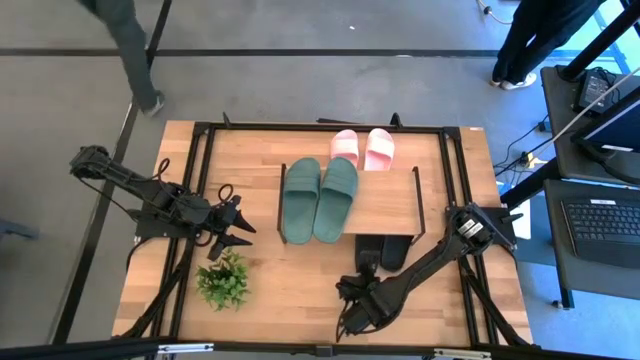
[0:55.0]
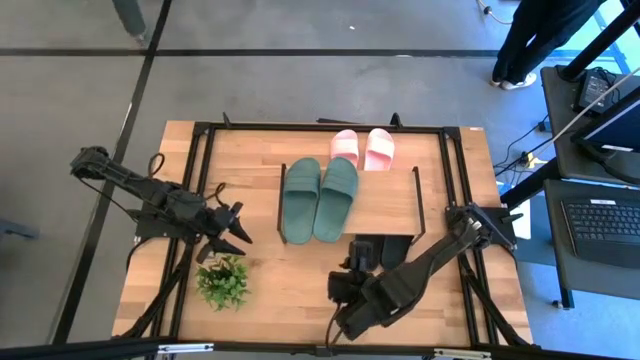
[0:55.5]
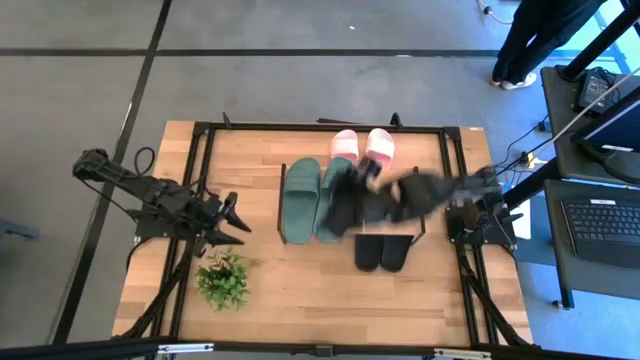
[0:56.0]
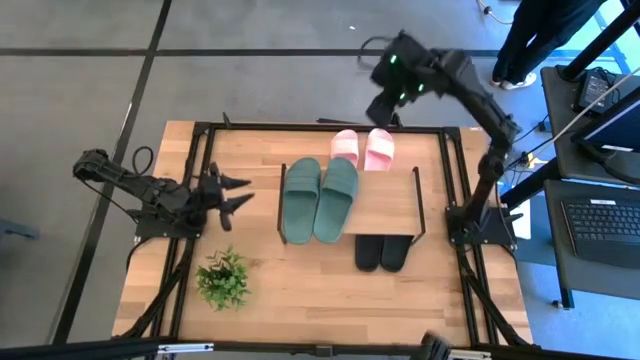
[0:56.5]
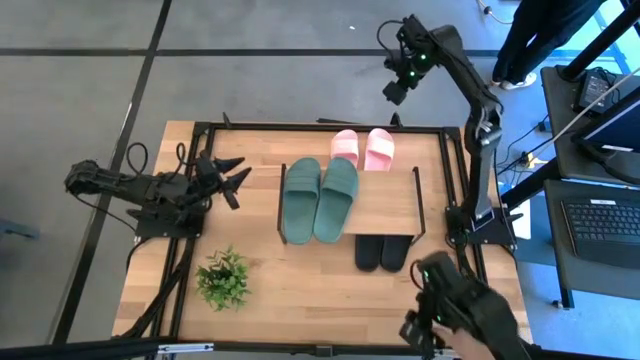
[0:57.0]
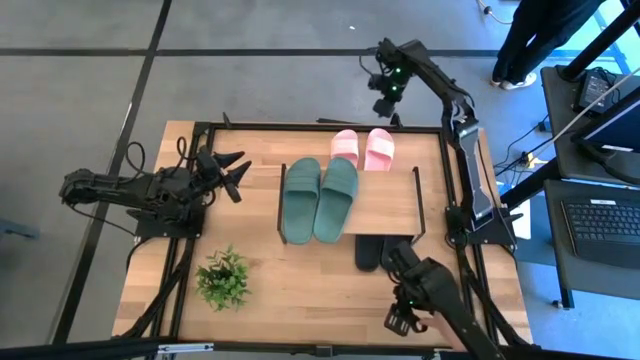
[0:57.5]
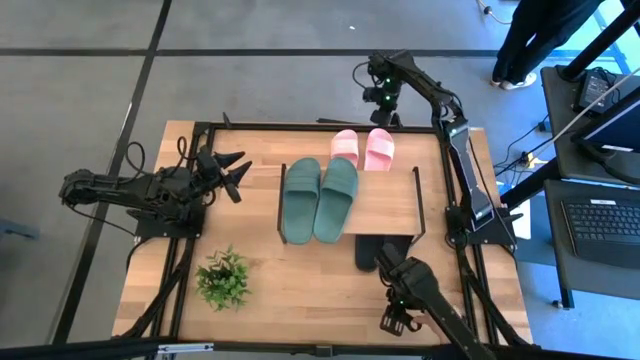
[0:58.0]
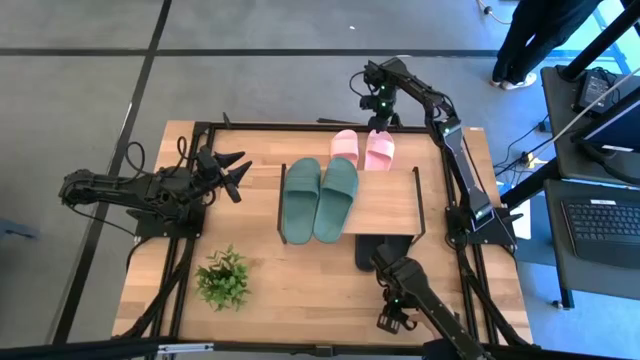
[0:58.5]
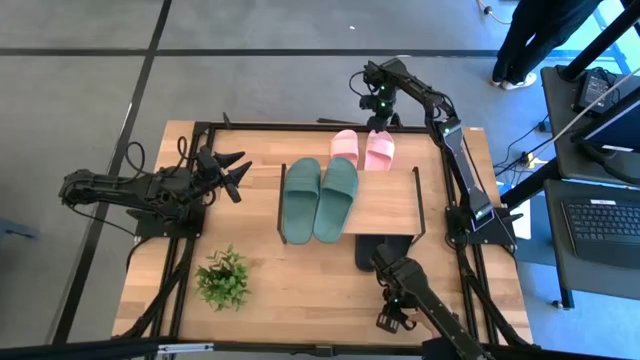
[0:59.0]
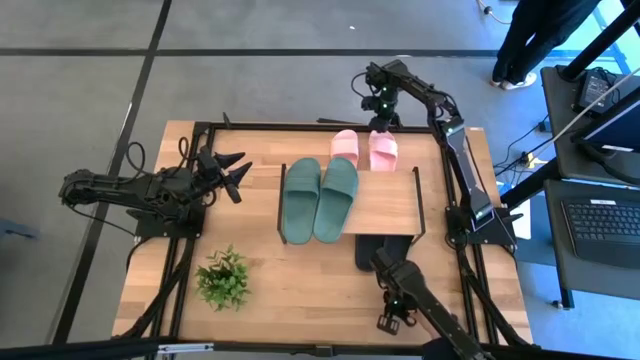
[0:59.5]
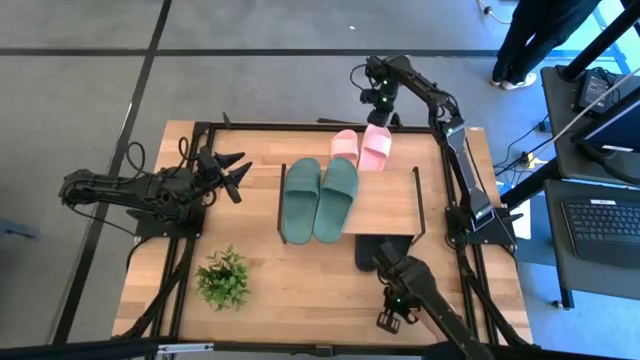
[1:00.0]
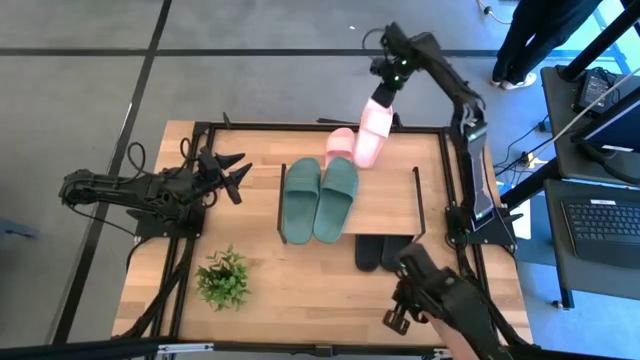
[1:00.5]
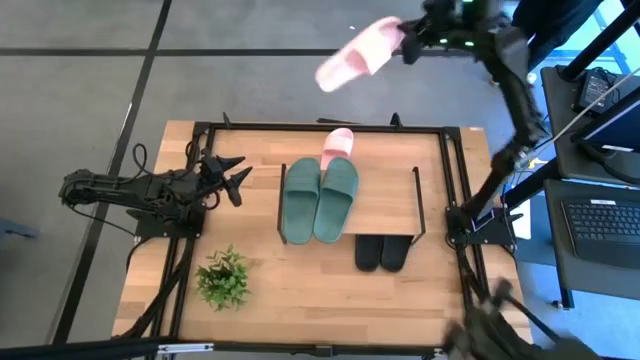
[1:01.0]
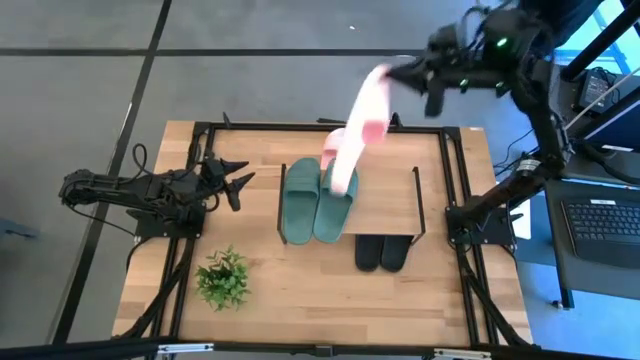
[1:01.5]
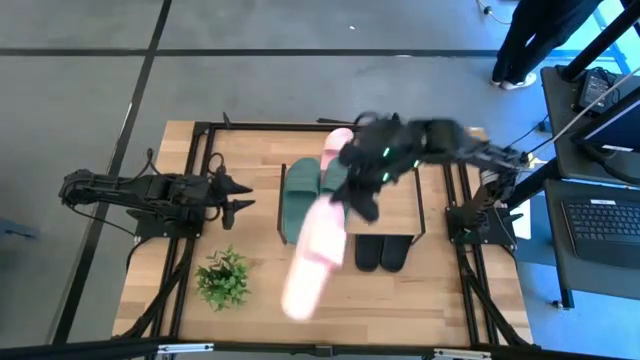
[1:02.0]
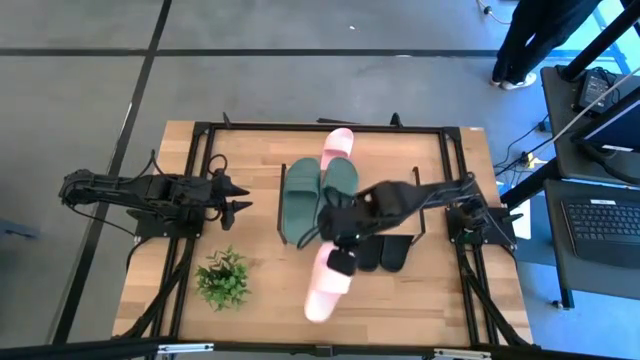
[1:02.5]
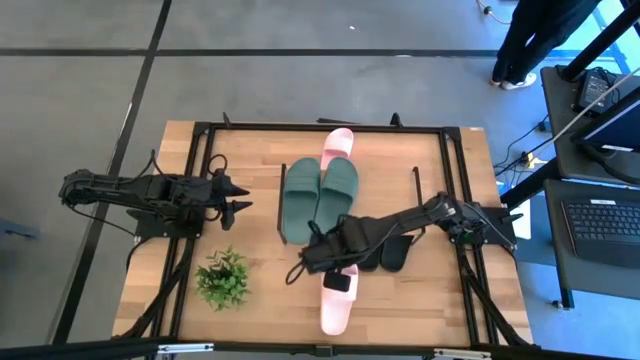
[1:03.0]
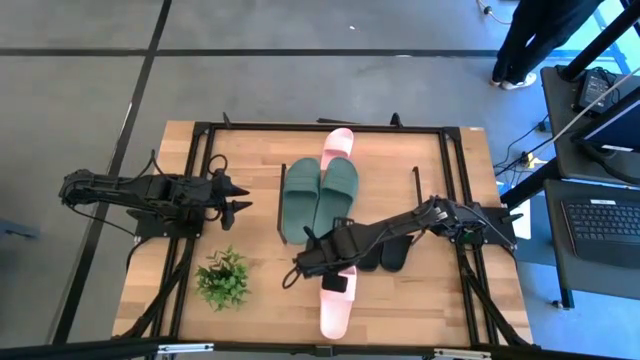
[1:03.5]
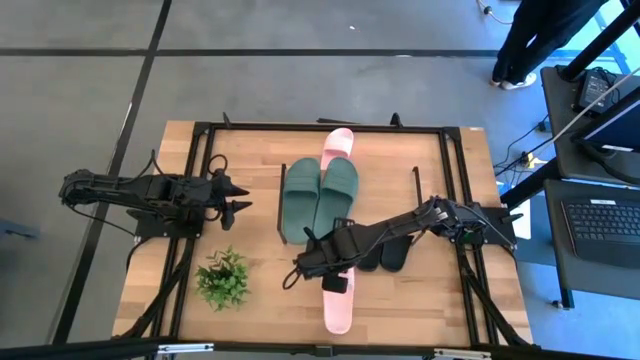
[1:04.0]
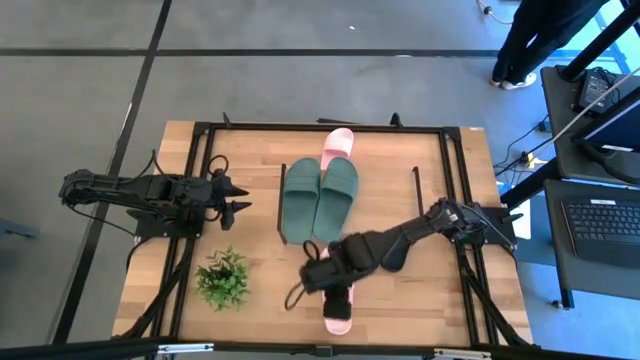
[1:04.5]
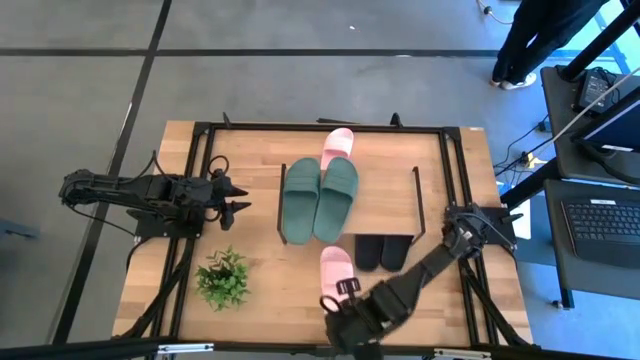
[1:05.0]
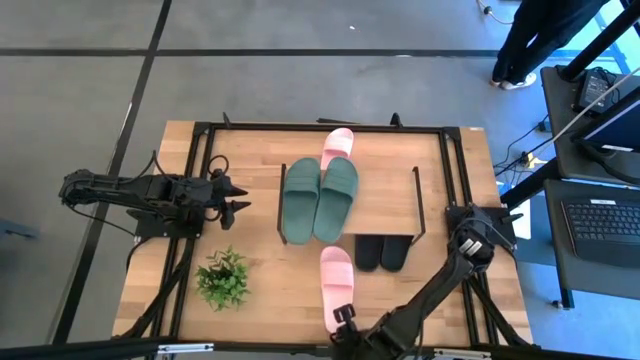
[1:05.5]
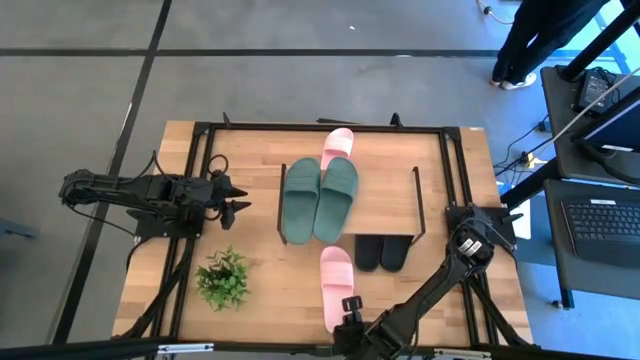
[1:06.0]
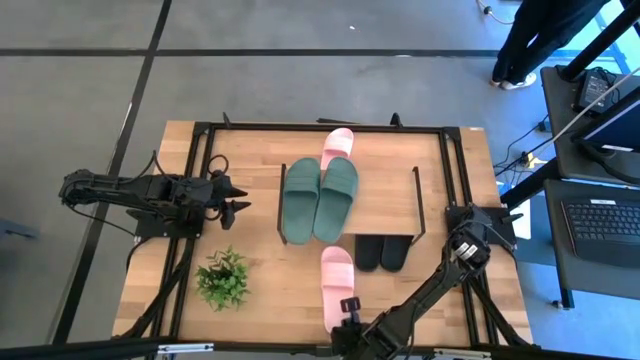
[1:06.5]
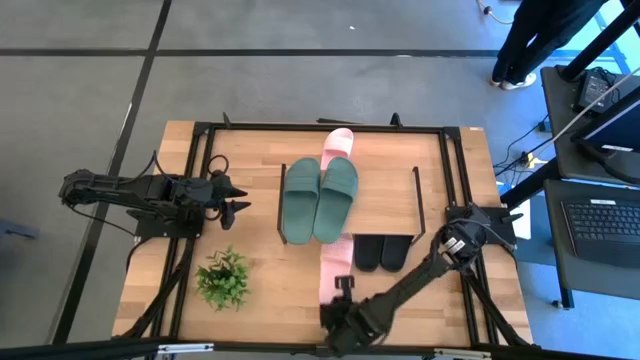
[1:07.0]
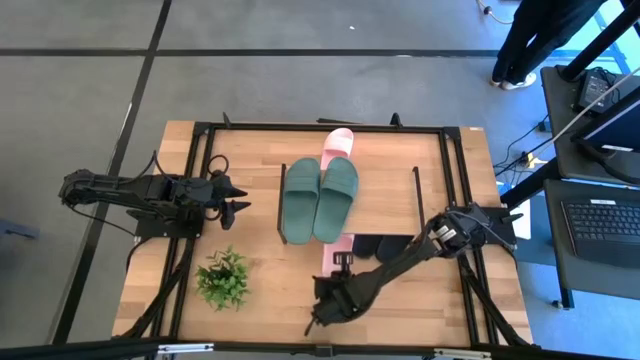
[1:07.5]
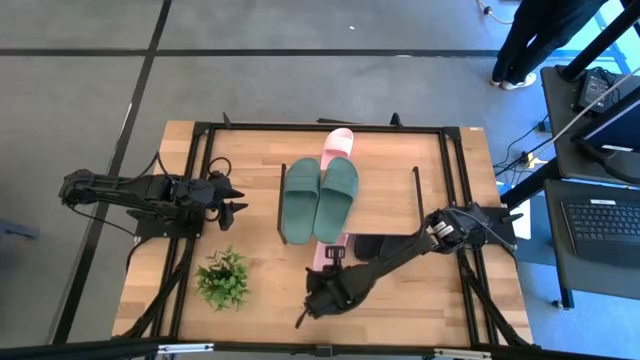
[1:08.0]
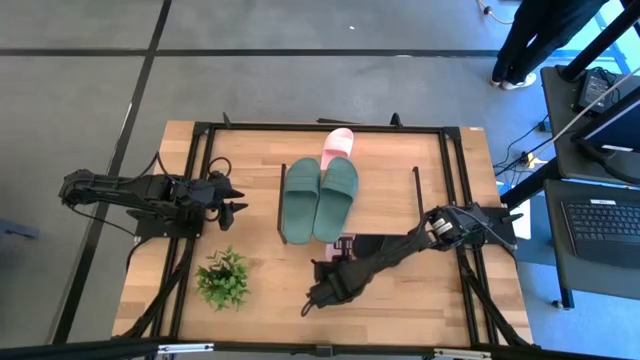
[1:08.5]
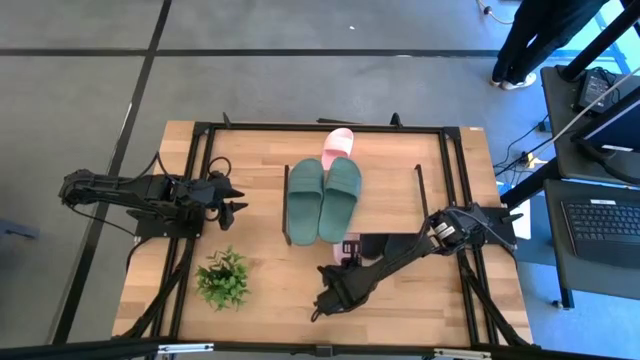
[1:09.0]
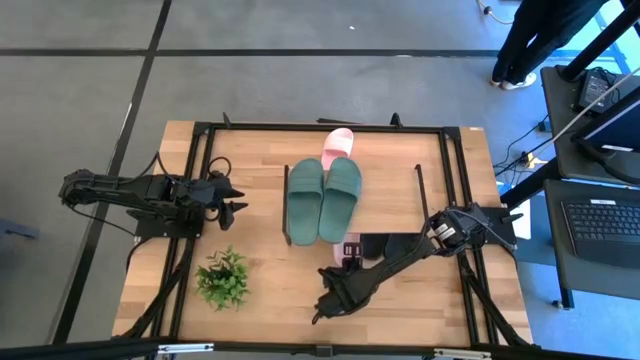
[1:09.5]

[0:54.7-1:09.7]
Task: Pick and place slides into the shelf
Put the right pink slipper under the shelf

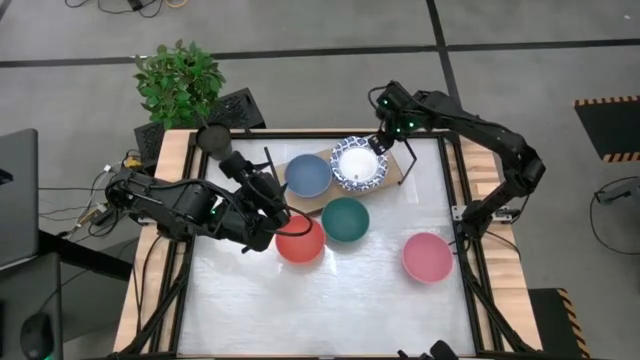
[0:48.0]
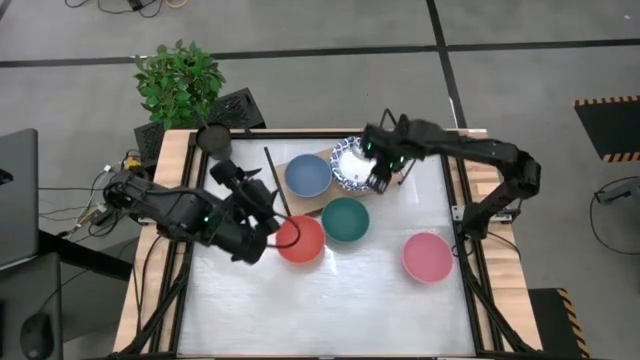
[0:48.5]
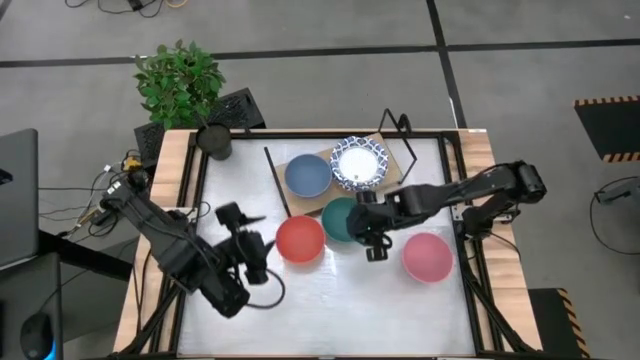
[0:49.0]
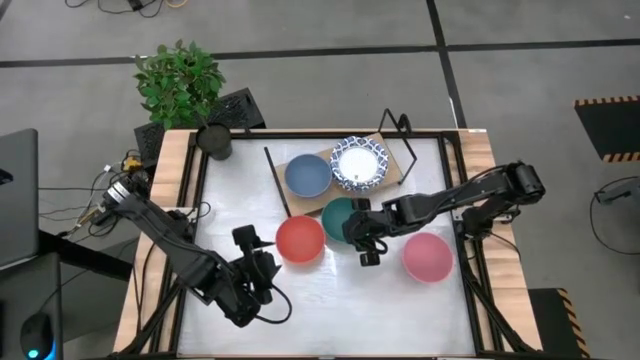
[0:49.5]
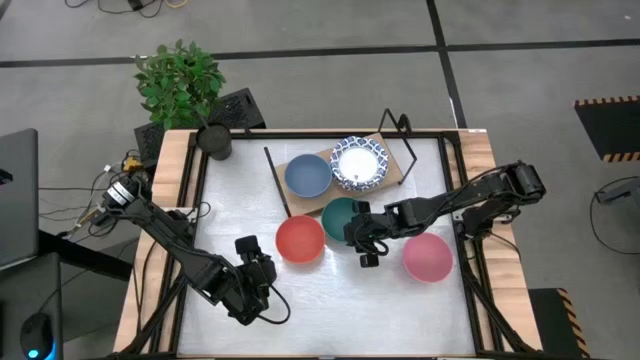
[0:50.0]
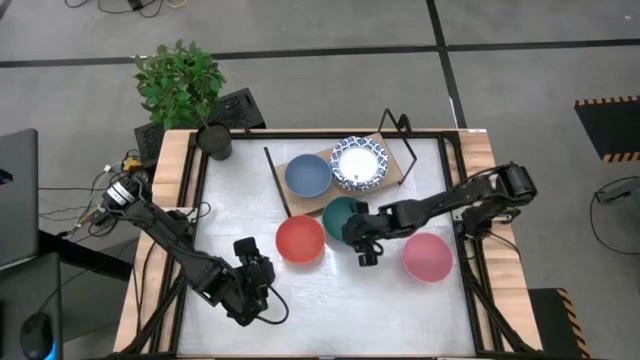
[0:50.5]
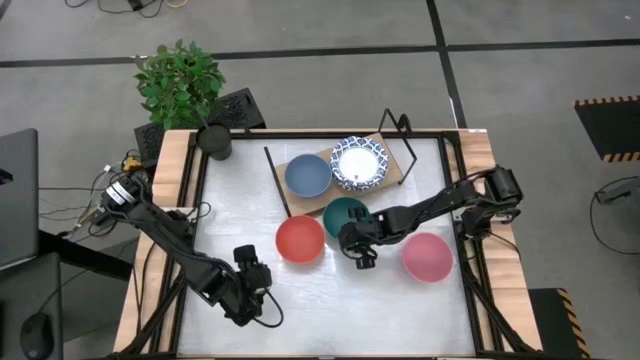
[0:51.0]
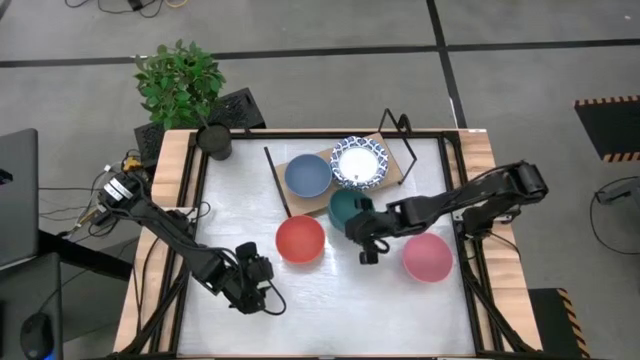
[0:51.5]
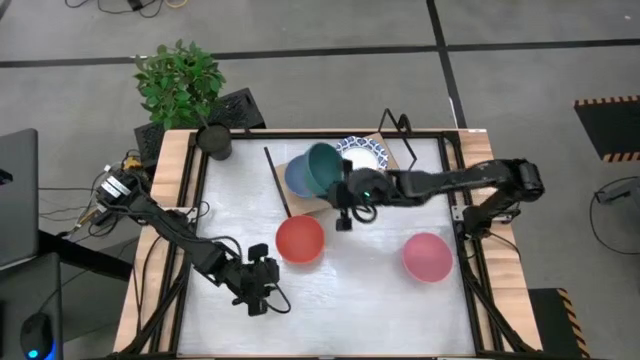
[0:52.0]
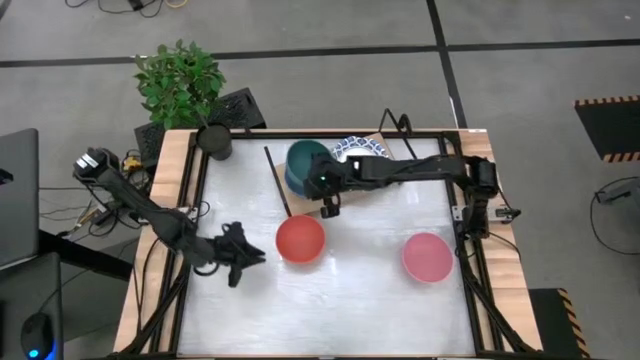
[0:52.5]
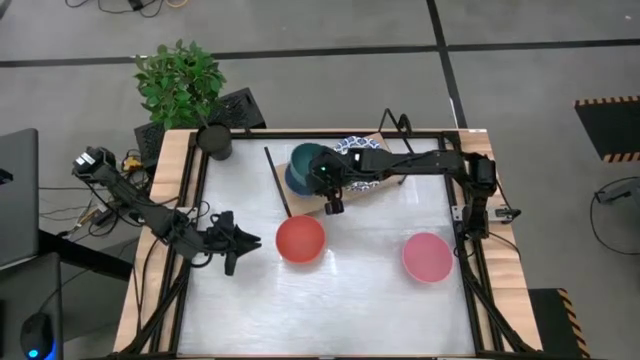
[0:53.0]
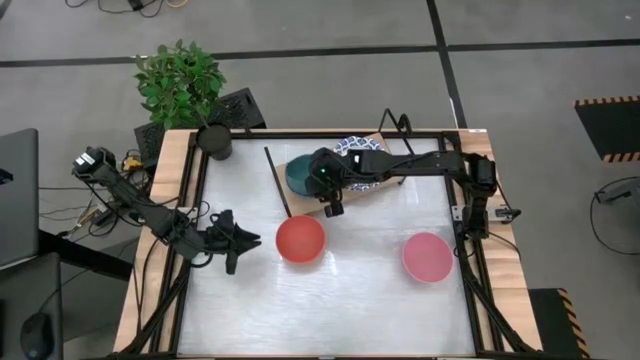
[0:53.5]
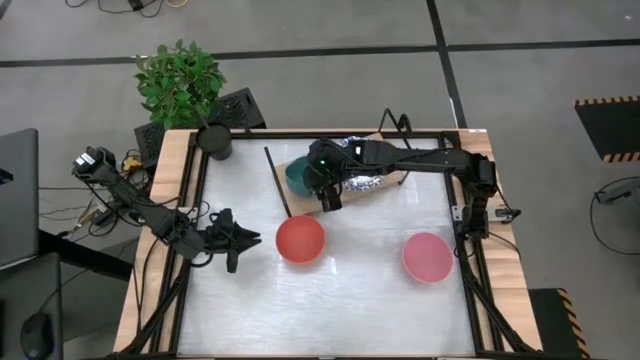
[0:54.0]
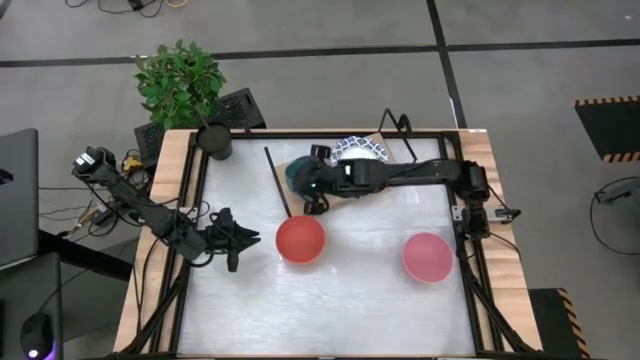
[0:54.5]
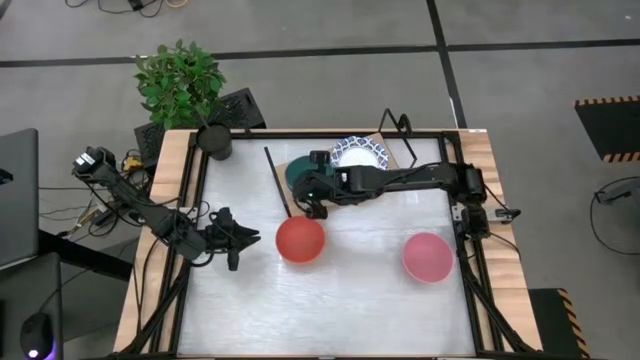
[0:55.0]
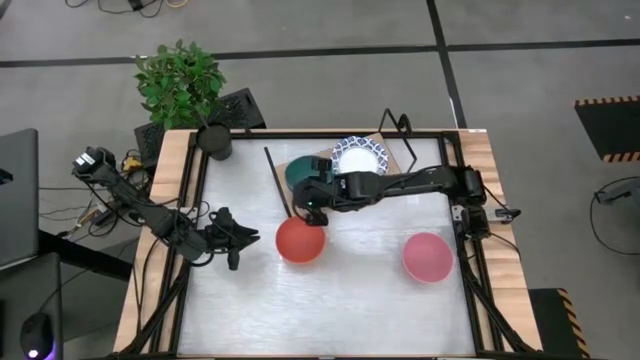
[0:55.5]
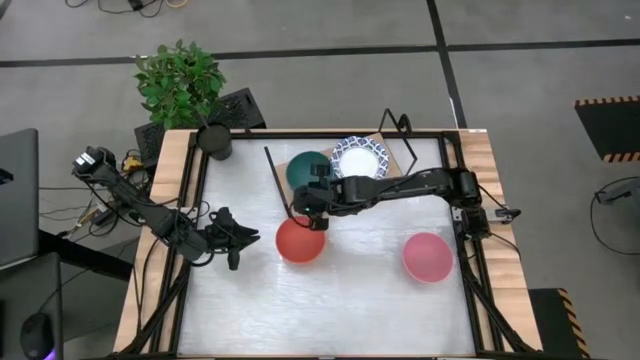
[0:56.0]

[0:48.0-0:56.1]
Task: Place and stack bowls onto a shelf
Stack the green bowl on top of the blue bowl
